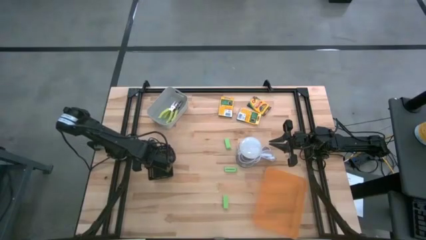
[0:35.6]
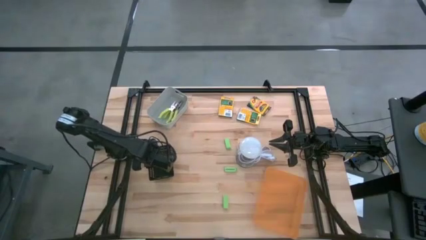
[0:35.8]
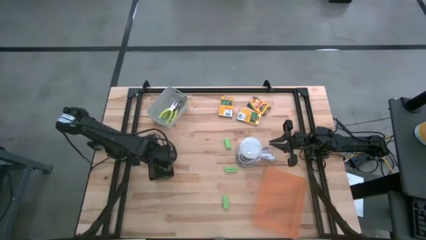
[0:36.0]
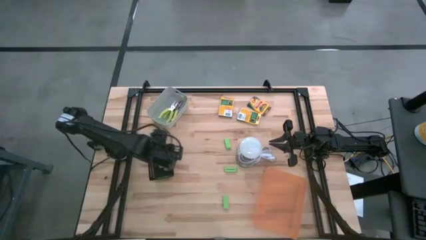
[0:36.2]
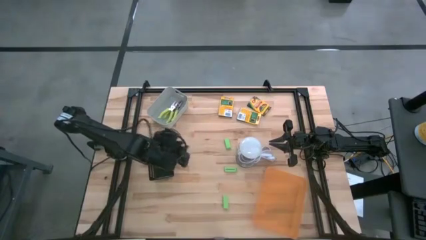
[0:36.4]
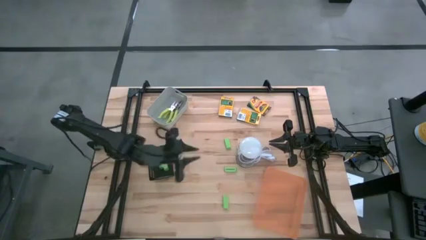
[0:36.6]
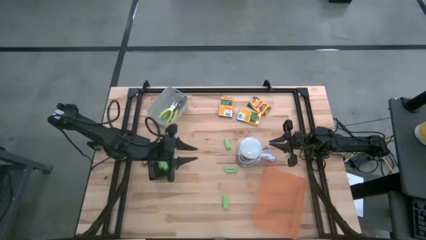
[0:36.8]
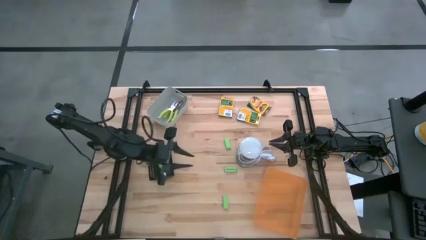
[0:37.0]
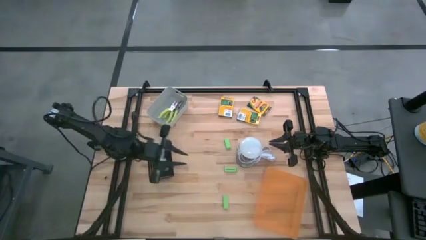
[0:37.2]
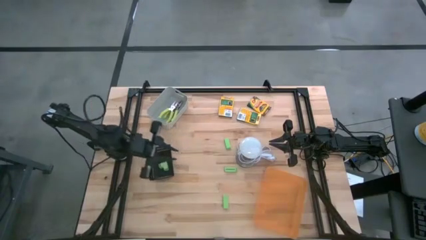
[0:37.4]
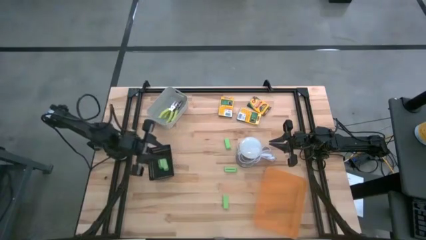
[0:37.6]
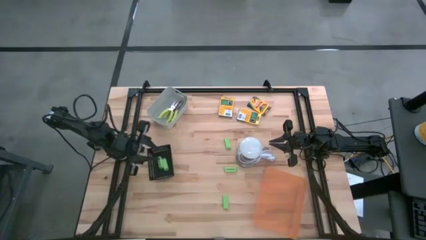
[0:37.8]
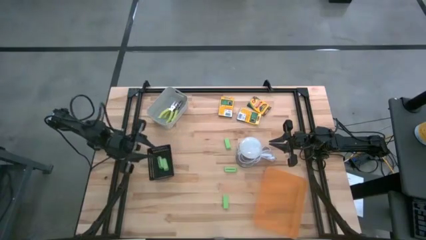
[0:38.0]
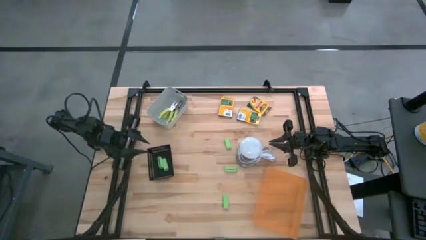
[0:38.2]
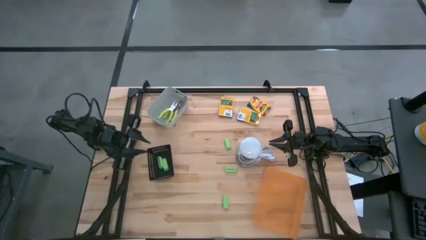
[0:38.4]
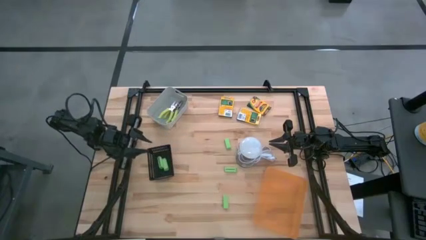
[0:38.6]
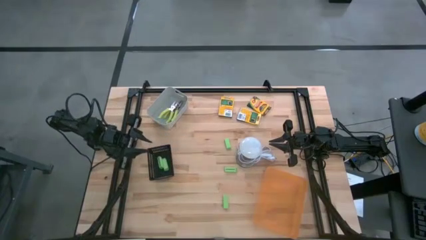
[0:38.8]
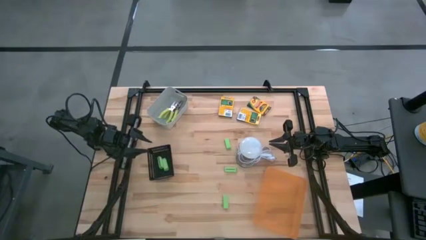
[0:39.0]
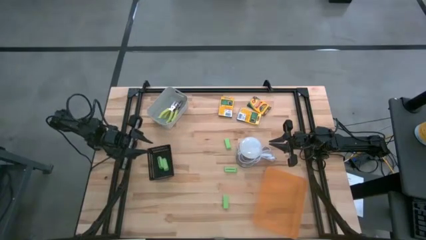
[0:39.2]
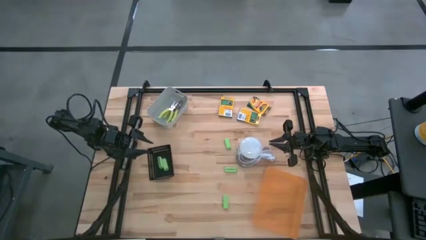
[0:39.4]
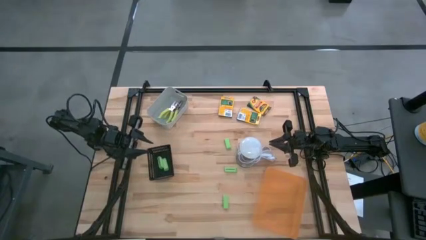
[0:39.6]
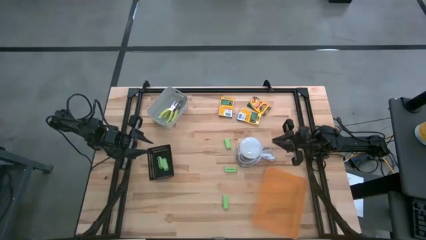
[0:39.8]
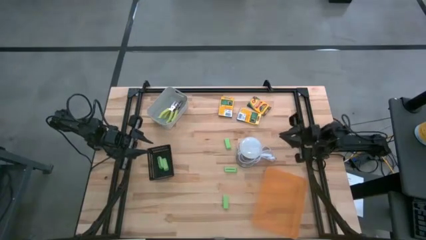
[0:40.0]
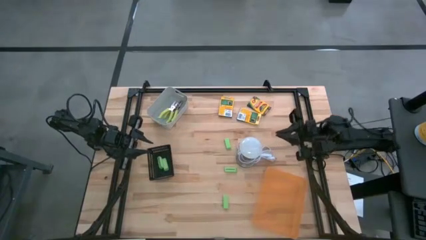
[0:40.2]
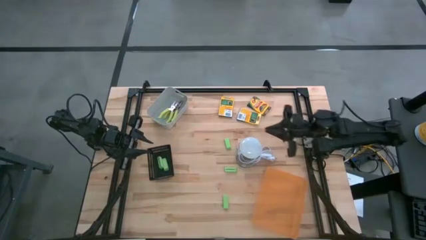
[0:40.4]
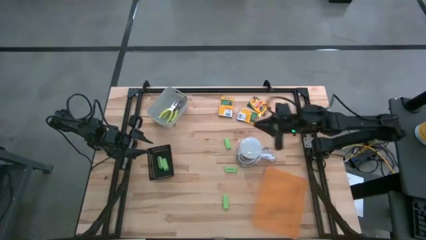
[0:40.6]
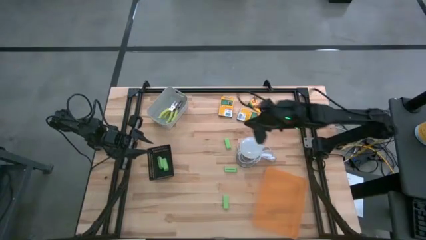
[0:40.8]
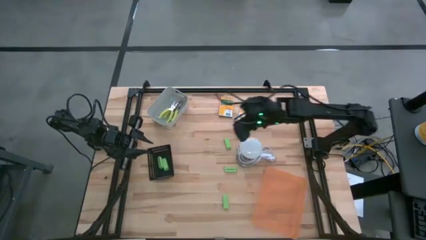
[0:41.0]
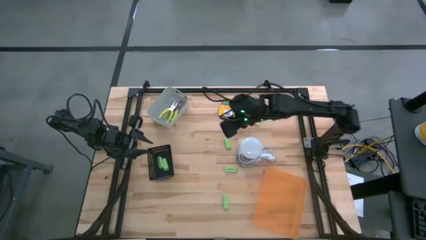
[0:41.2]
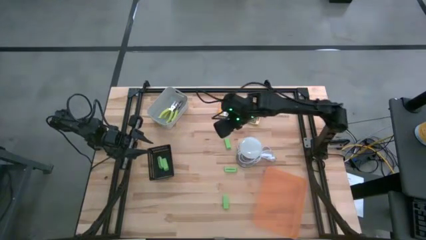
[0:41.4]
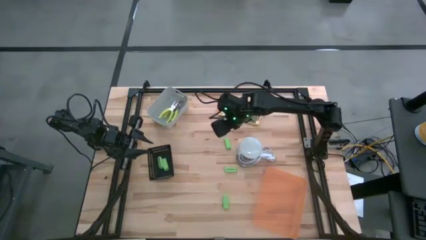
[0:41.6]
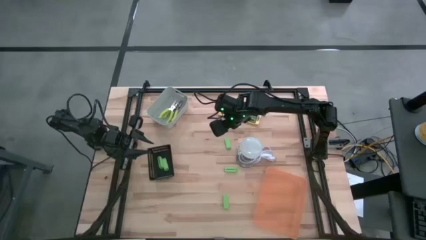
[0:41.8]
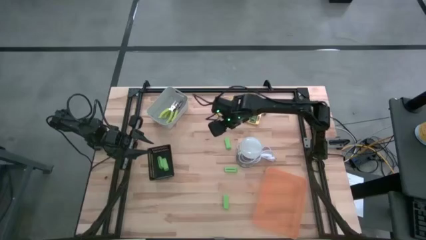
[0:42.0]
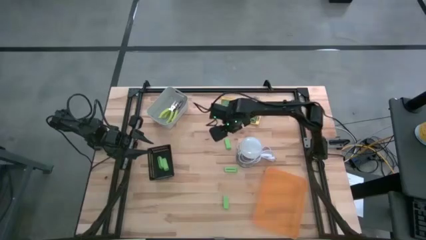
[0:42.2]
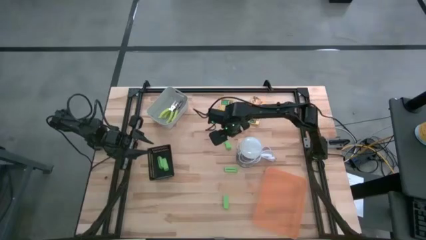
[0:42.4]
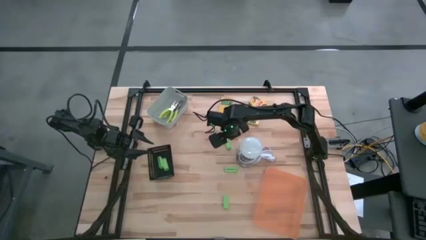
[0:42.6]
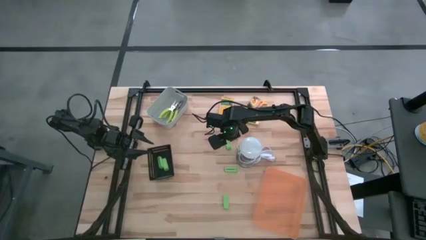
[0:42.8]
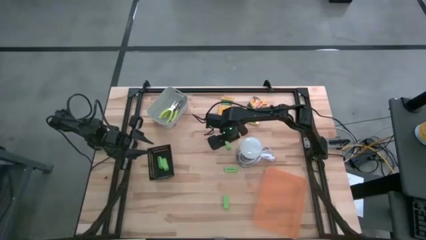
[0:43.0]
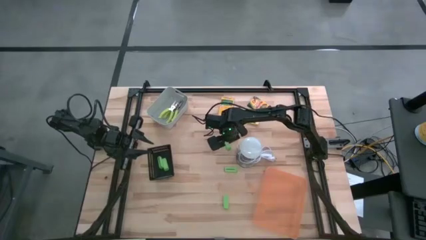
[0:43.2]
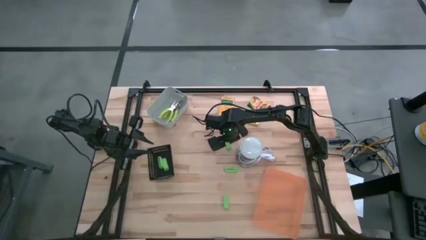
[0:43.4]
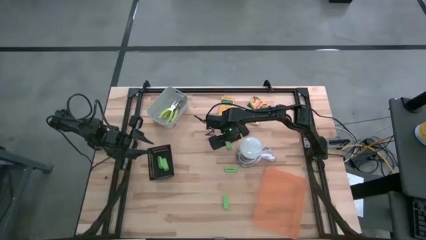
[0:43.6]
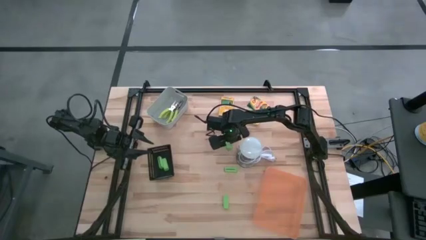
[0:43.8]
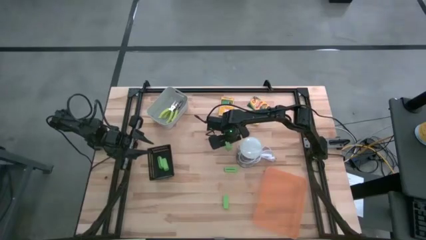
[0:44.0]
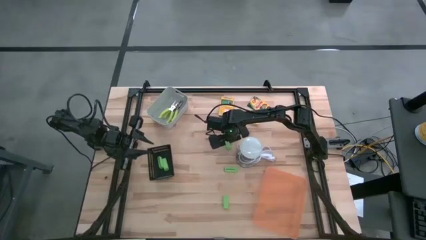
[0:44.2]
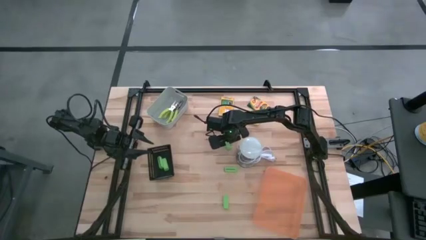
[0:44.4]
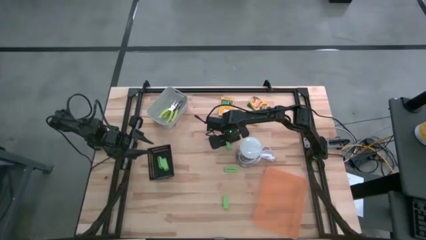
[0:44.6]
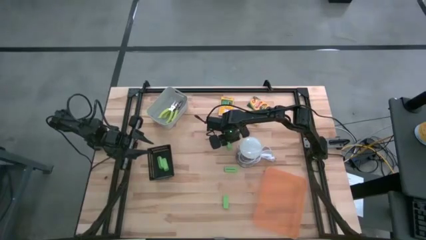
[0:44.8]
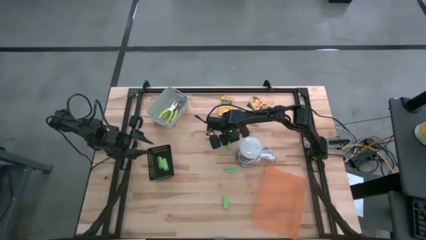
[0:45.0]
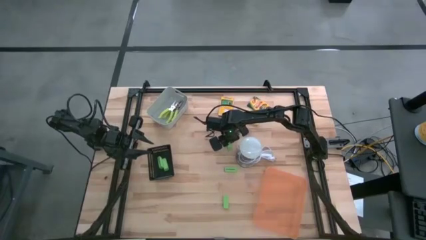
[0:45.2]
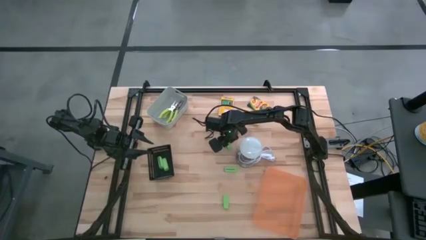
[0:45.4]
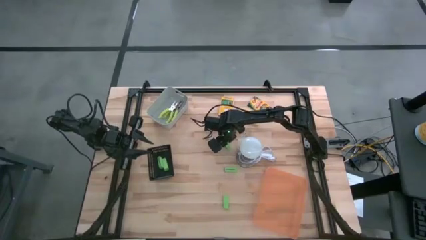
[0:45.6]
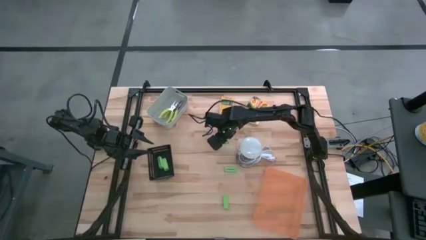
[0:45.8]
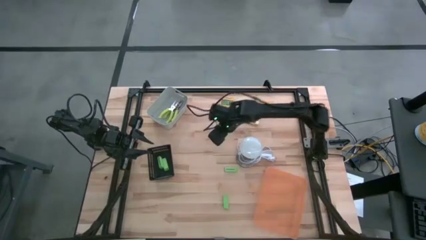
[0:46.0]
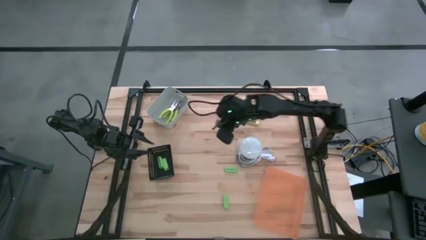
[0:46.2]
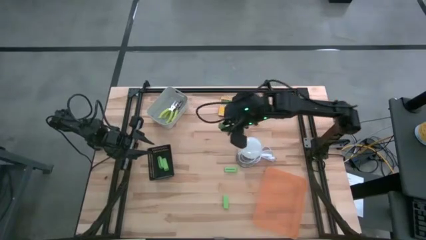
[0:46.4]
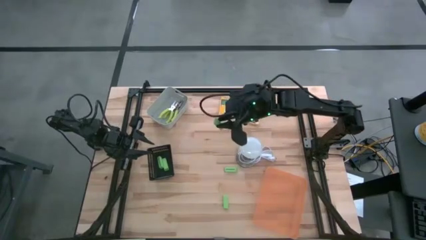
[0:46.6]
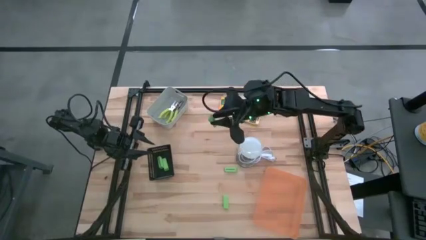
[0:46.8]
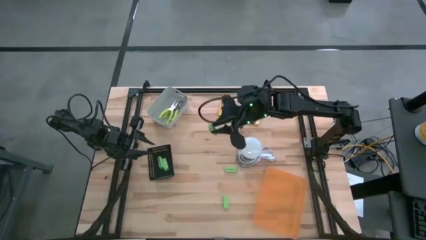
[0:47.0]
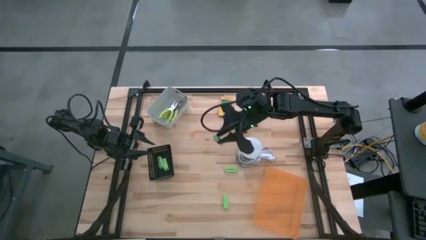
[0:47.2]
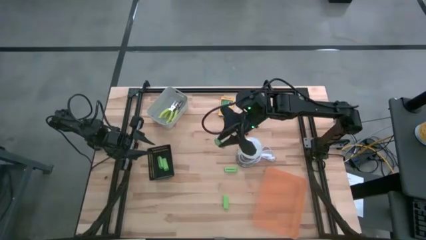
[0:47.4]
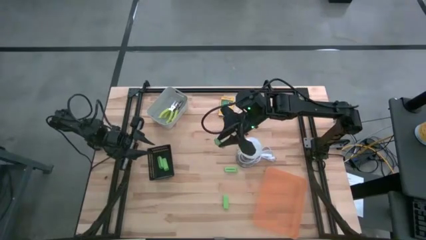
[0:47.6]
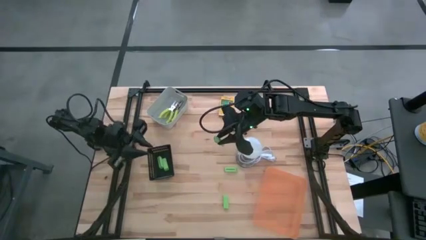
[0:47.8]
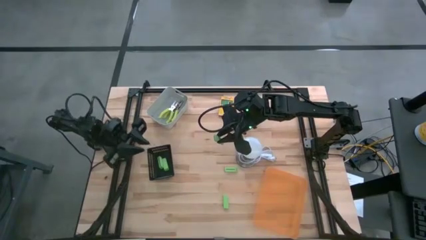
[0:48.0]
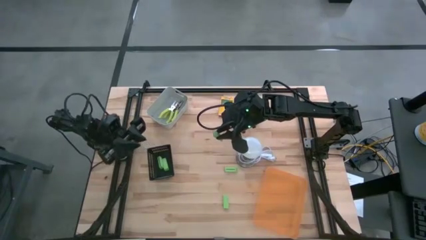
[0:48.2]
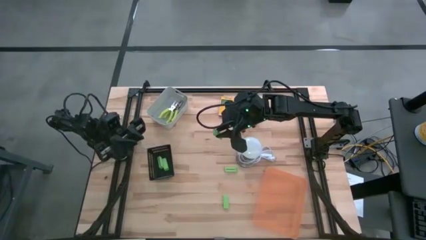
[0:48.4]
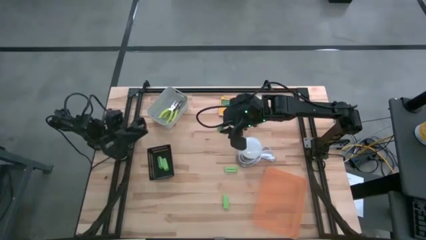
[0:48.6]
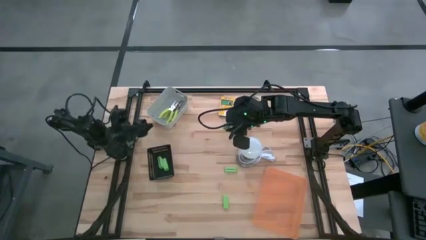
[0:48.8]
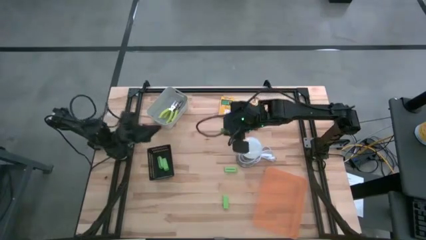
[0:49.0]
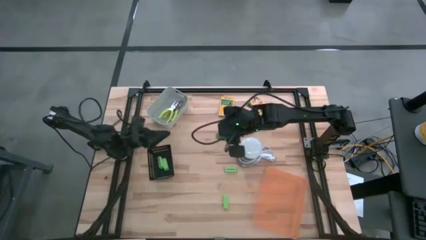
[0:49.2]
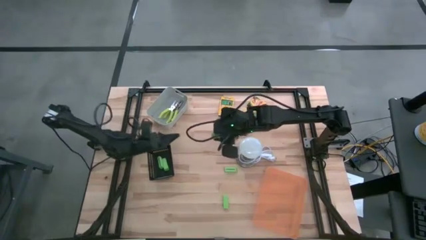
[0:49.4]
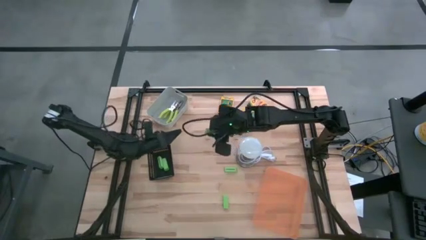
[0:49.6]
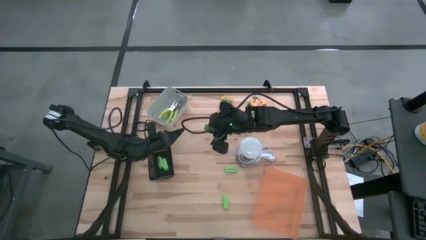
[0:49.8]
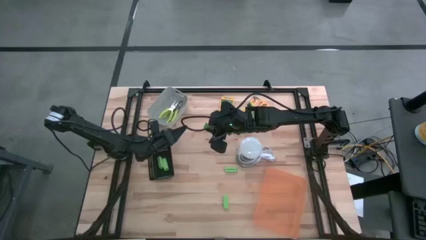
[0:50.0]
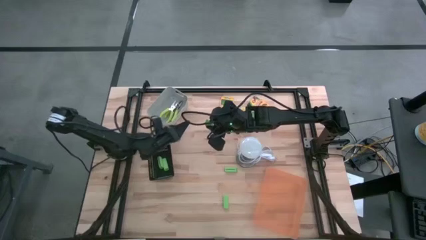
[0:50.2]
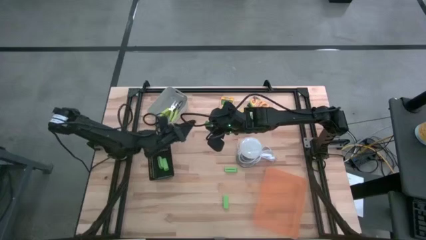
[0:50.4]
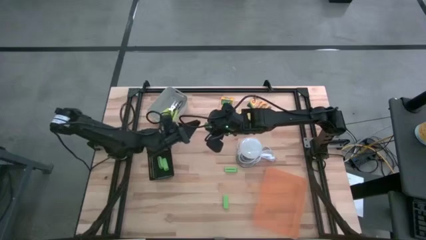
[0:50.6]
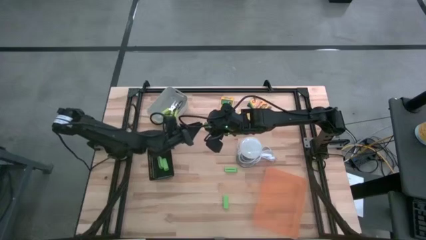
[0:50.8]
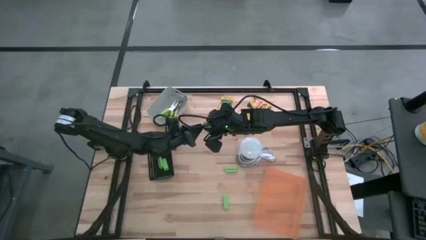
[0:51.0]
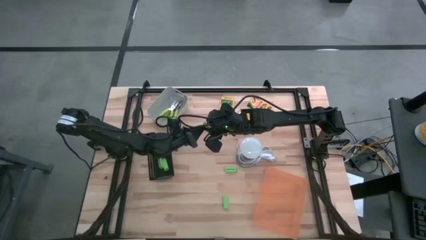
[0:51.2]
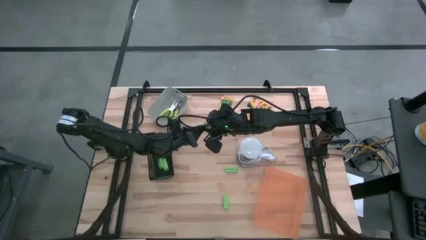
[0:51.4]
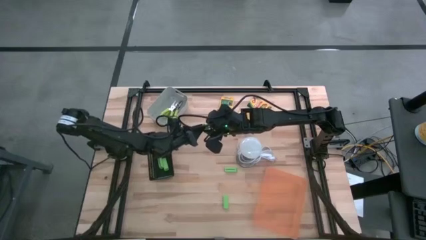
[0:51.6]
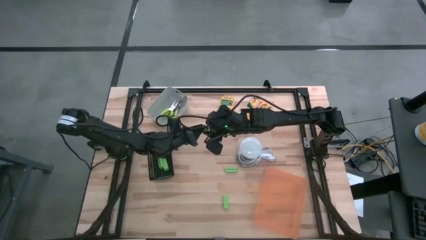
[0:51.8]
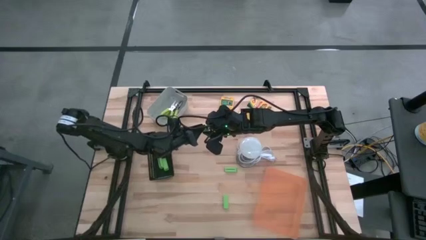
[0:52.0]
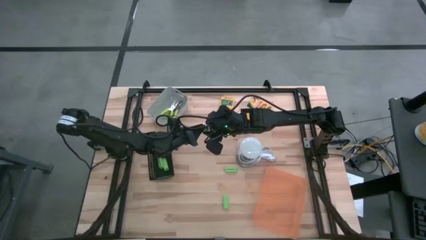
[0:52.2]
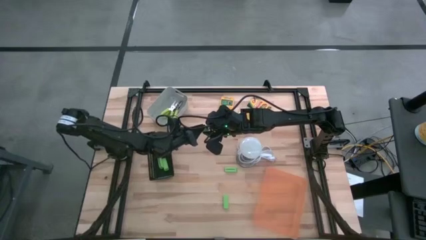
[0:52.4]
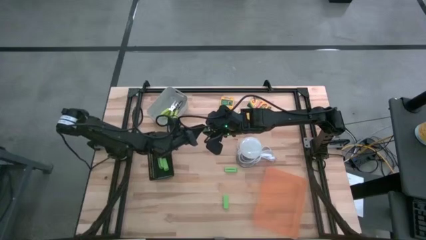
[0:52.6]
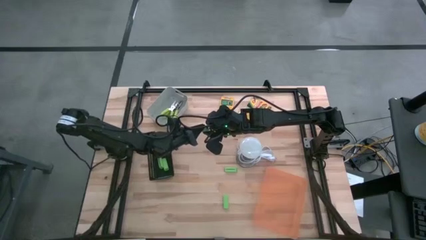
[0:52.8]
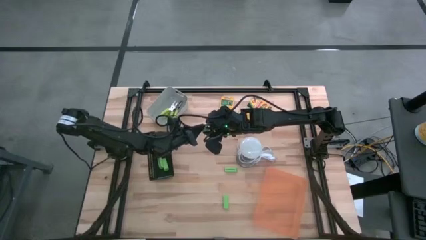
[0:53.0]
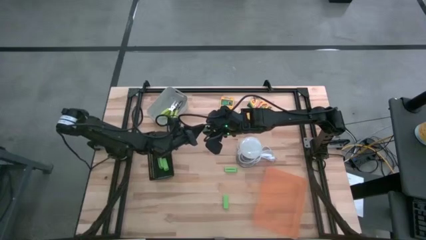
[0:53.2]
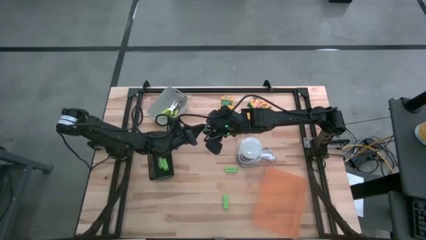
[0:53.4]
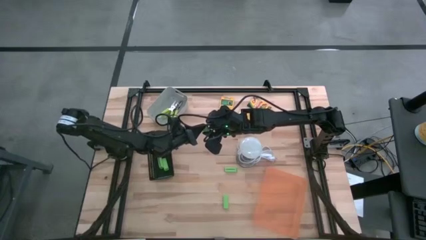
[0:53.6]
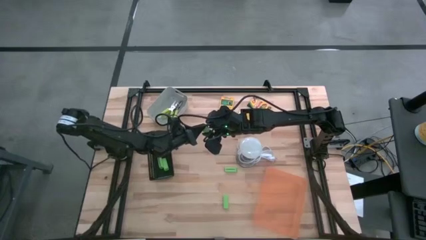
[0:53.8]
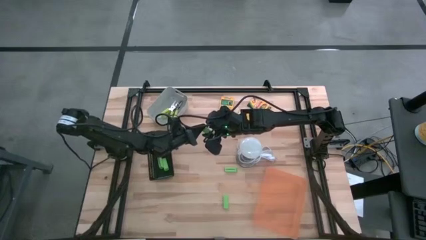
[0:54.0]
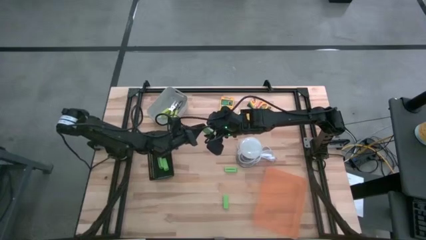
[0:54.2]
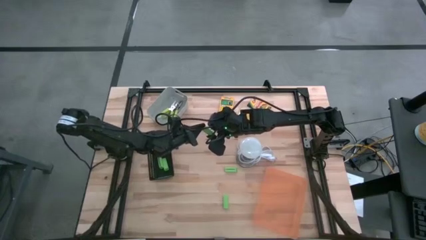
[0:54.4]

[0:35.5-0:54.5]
Task: Pick & Place School Supplies
Put the green eraser into the black bin
